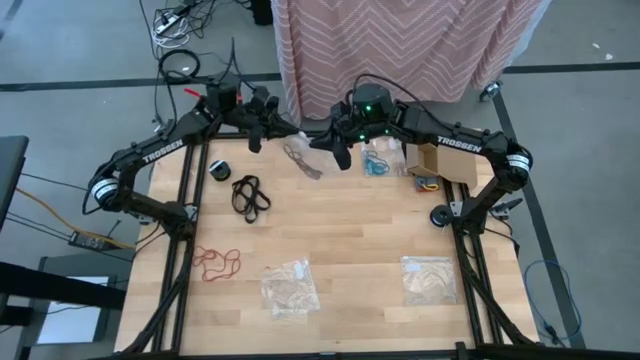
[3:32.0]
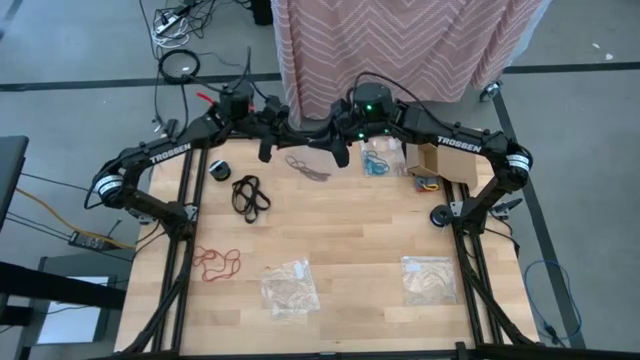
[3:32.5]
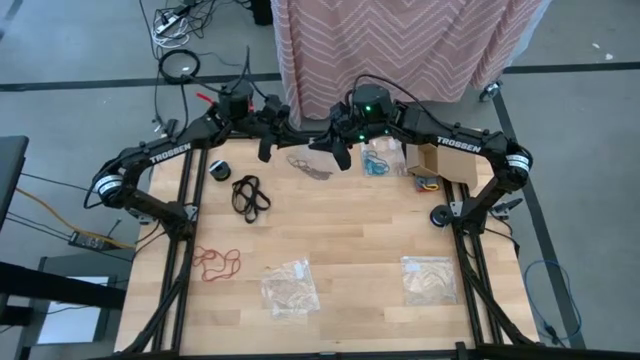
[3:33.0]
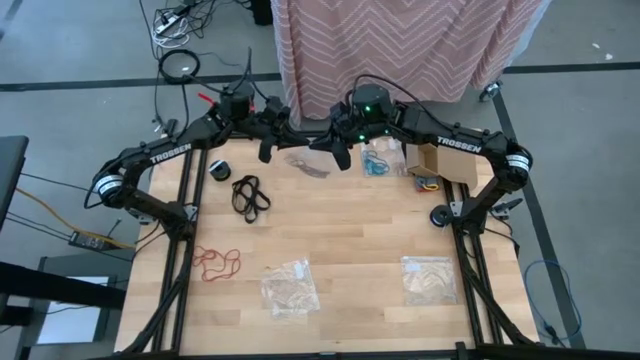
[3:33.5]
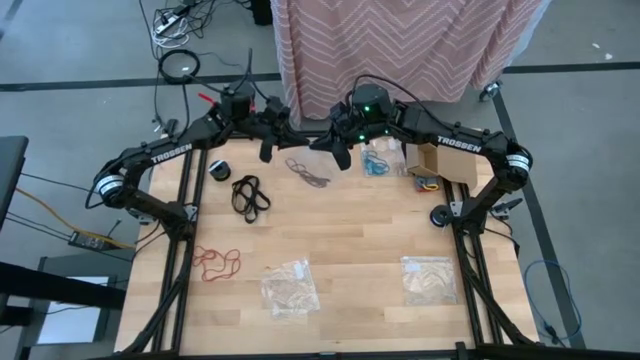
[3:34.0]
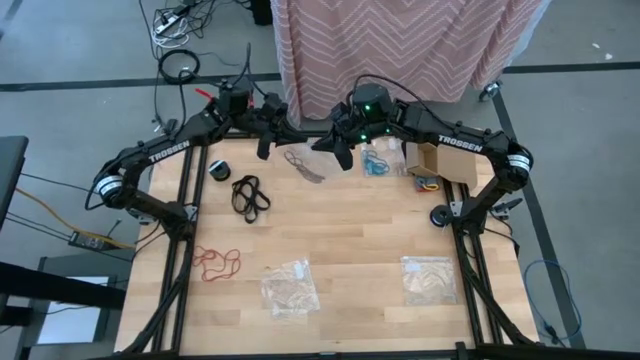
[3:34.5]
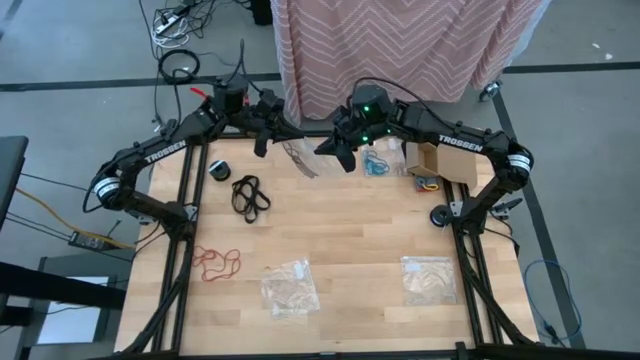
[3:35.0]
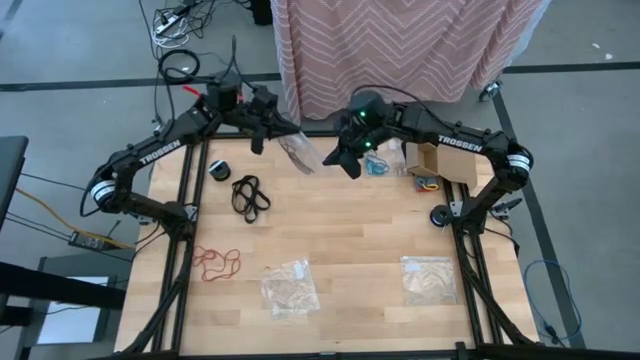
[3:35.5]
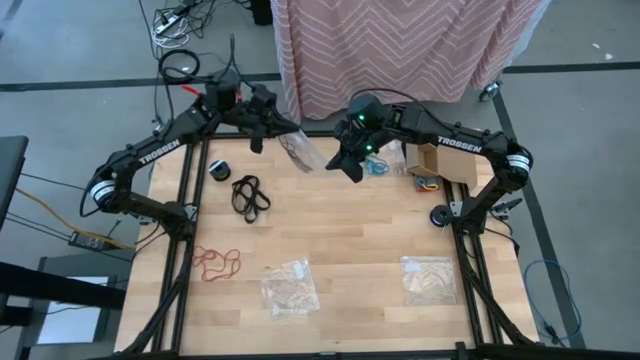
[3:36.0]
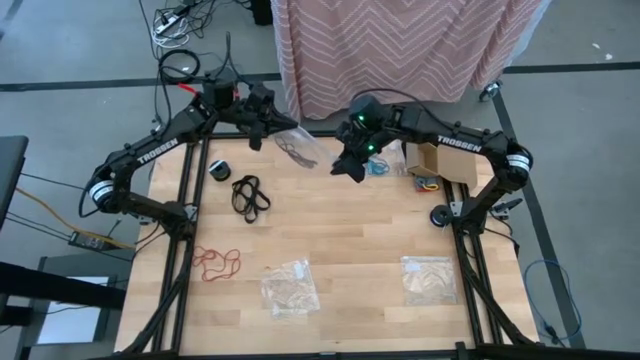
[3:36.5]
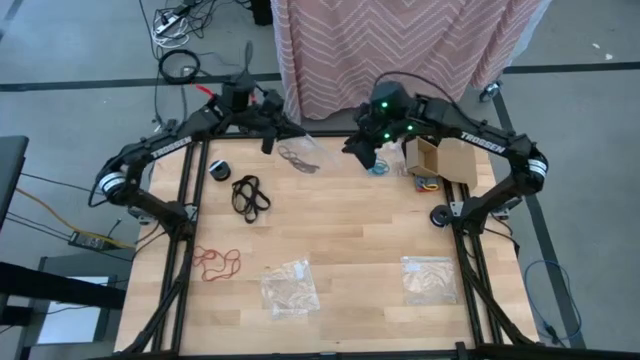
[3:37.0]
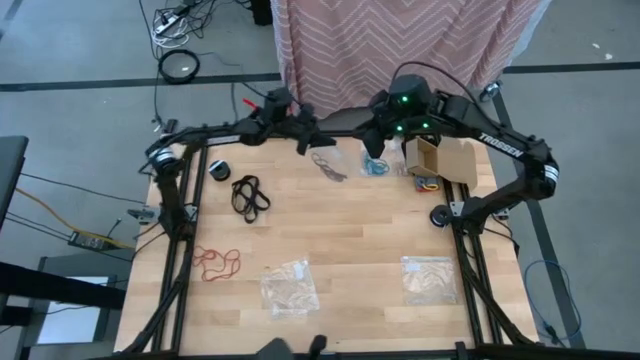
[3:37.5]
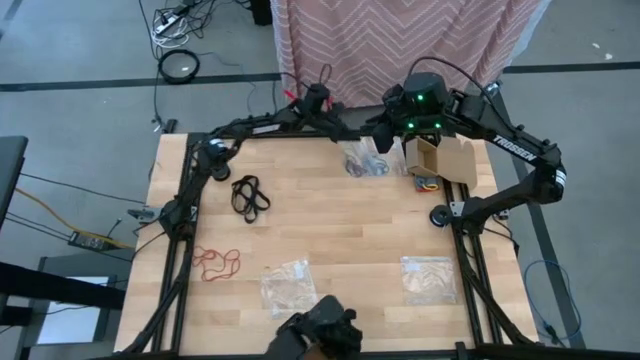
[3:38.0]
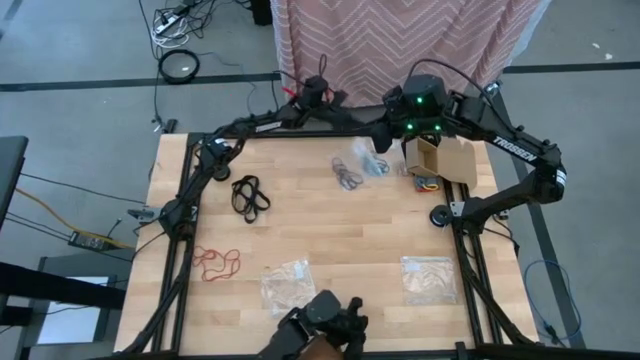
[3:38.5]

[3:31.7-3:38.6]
Task: Sort rubber bands
Close the bottom center transparent zip bag

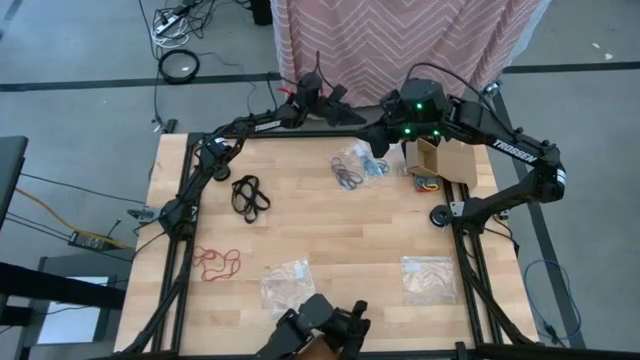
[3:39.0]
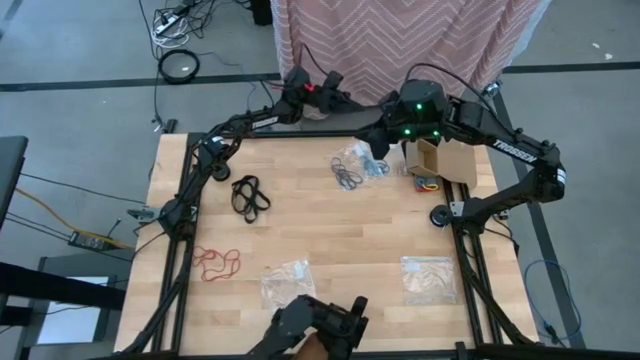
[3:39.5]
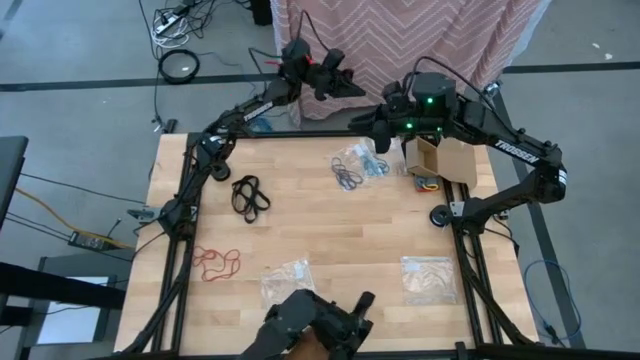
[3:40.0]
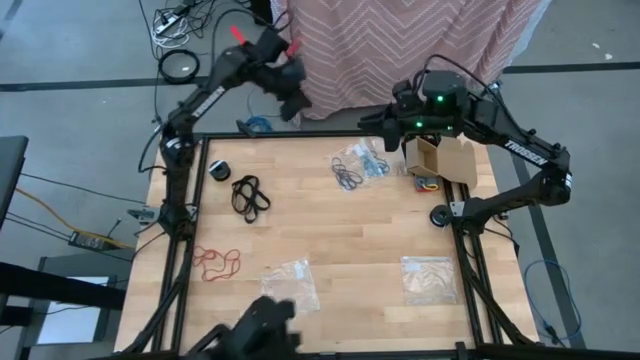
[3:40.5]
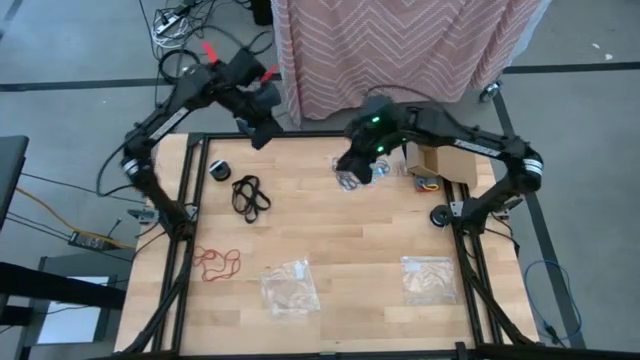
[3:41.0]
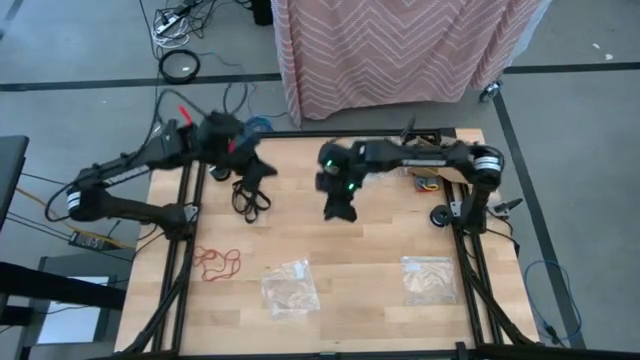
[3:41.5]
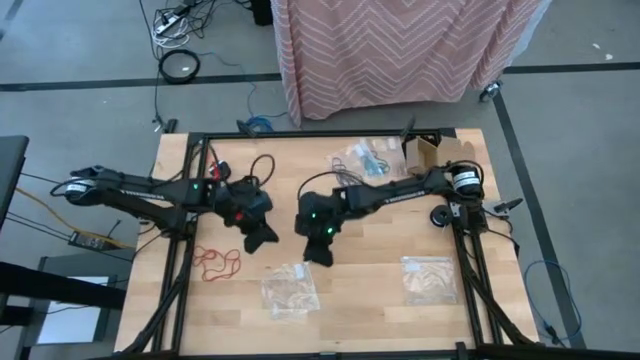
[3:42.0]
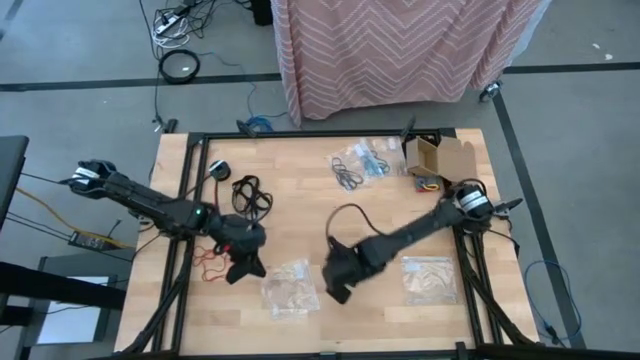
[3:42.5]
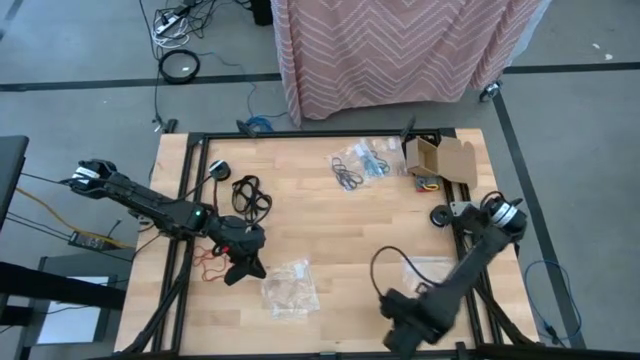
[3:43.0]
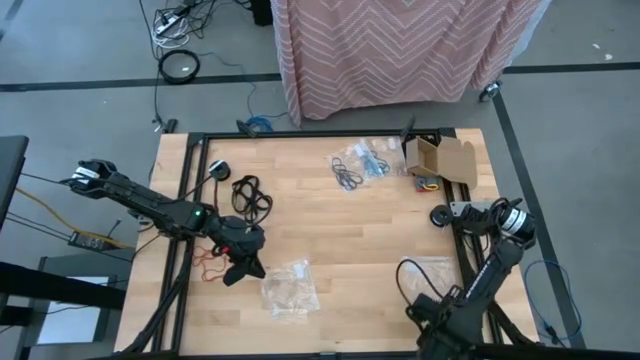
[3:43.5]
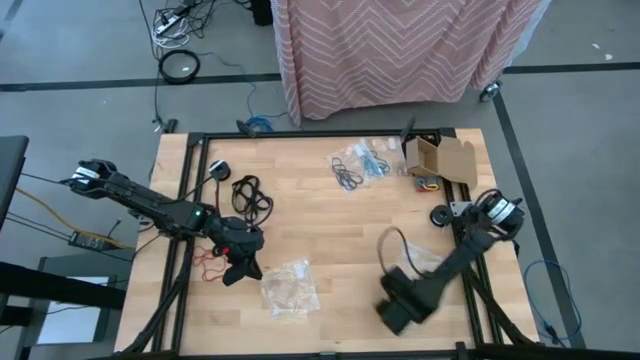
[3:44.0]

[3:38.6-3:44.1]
Put the right transparent zip bag to the center of the table

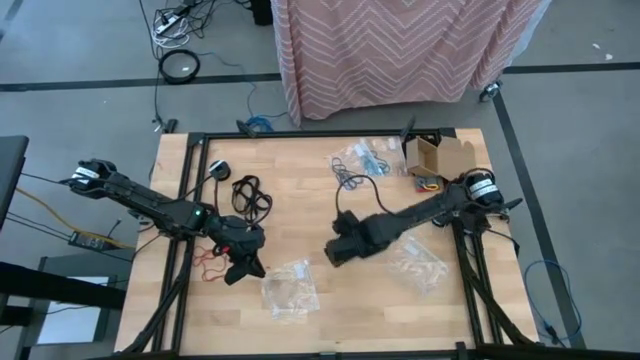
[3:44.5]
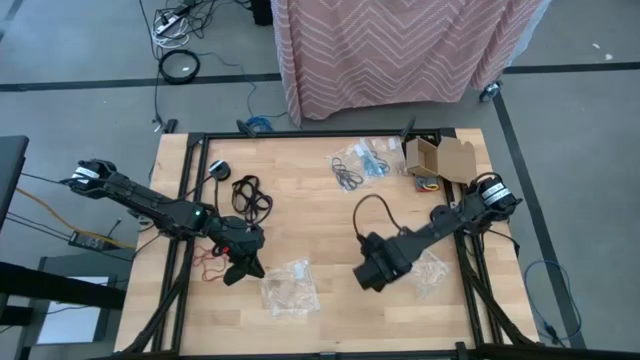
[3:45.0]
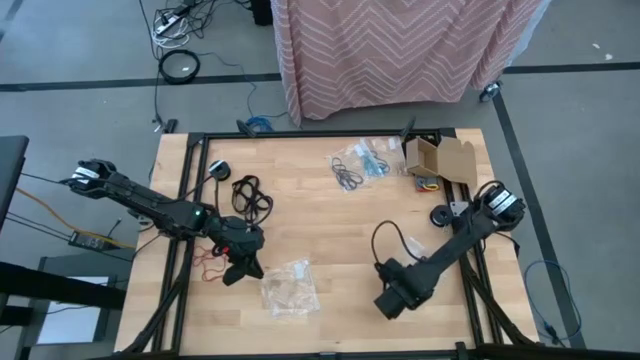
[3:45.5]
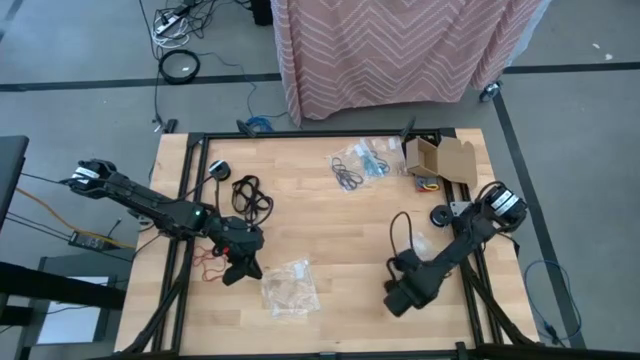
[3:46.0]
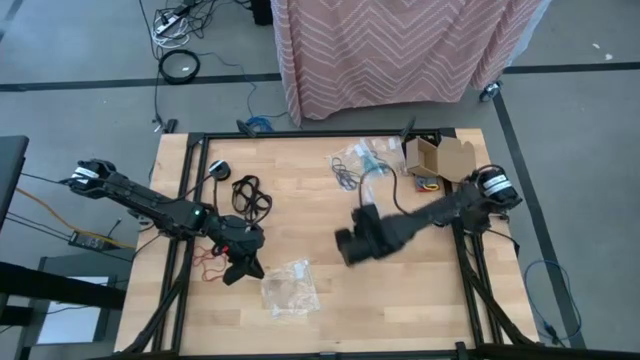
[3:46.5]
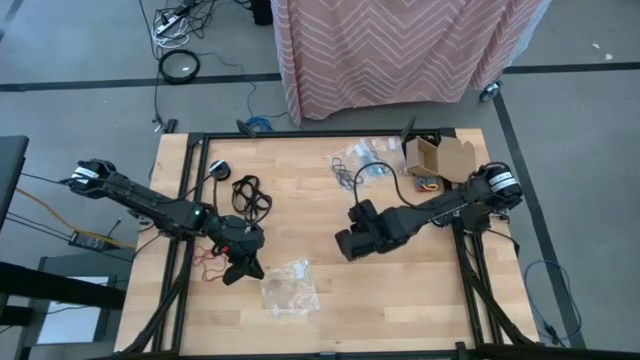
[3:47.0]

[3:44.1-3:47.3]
Put the right transparent zip bag to the center of the table

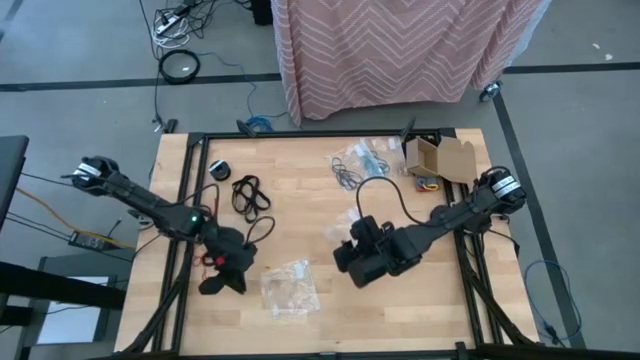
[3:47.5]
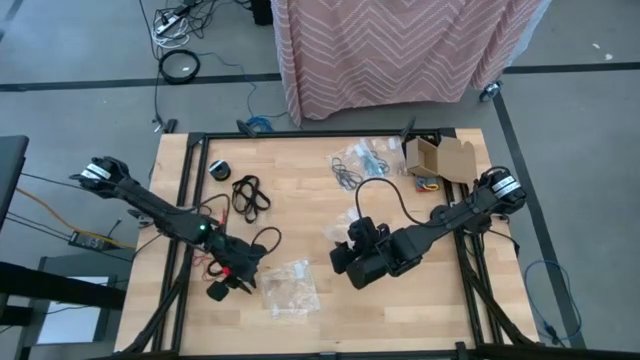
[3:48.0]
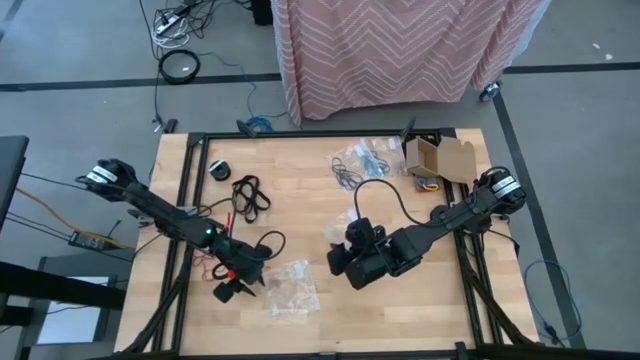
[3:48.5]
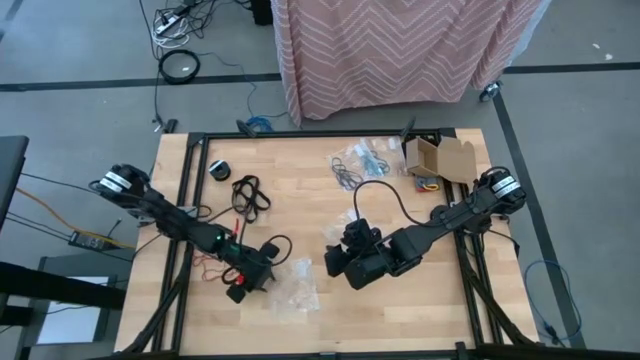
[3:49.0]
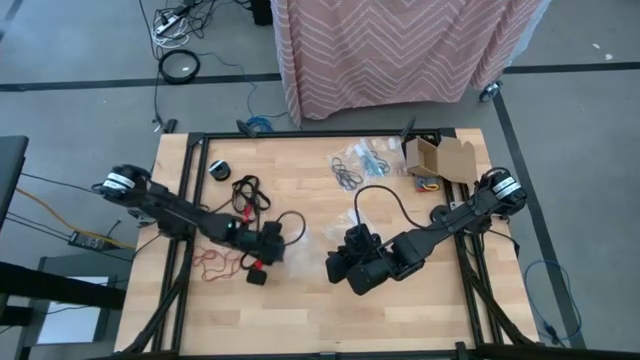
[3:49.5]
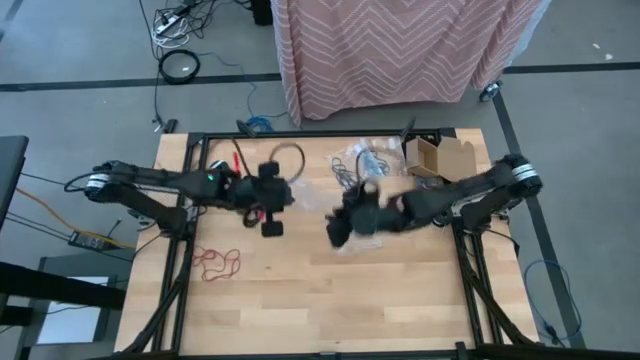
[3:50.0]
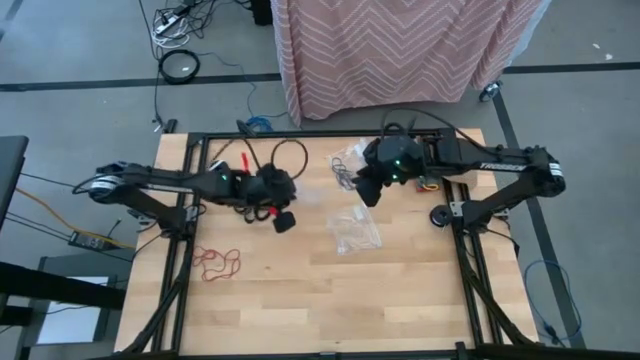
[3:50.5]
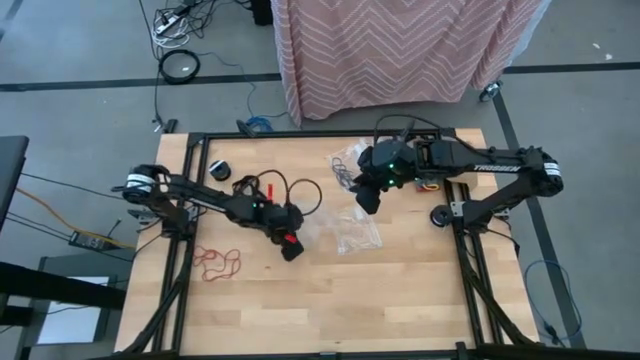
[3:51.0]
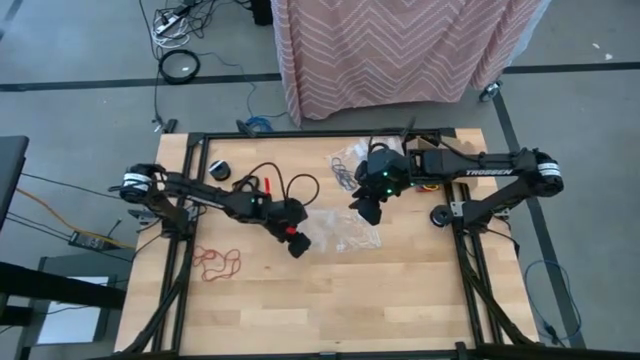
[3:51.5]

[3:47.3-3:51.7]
Put the left transparent zip bag to the center of the table

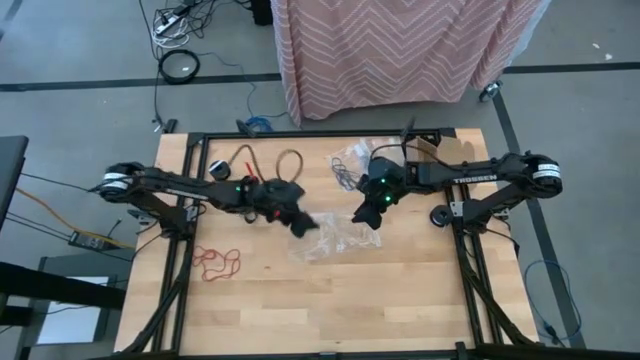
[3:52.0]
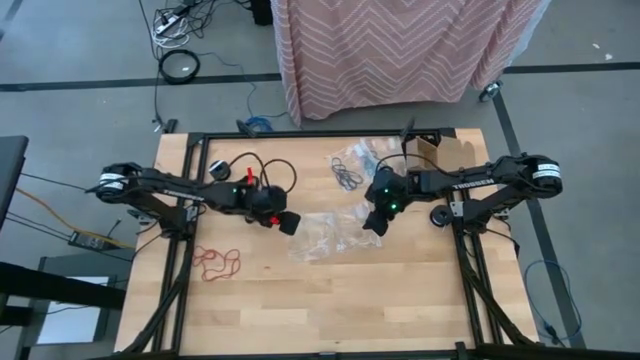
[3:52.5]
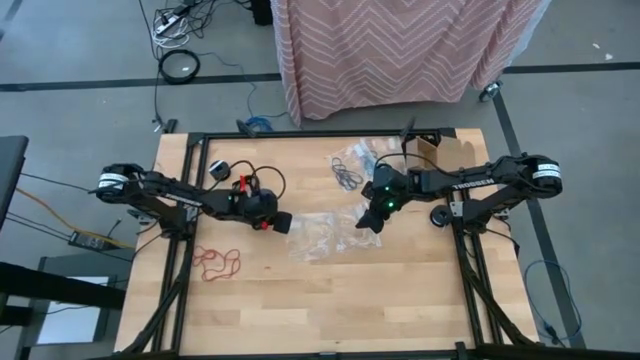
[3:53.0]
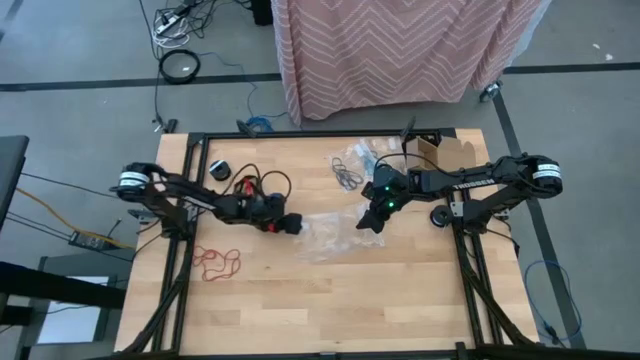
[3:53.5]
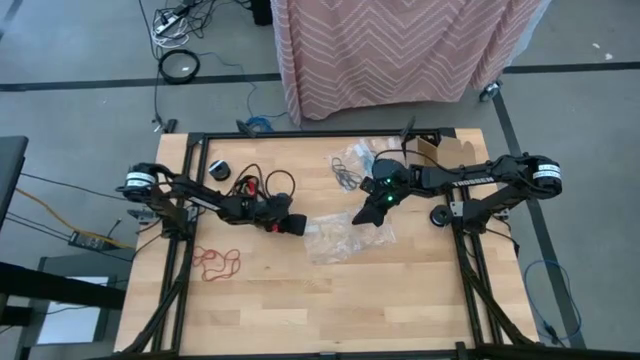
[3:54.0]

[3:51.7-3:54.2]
Open the left transparent zip bag
